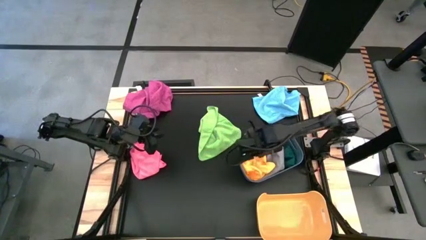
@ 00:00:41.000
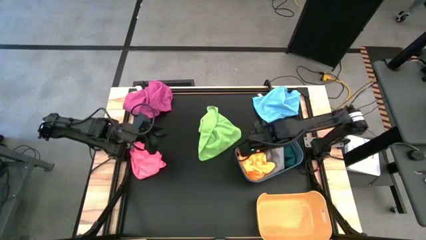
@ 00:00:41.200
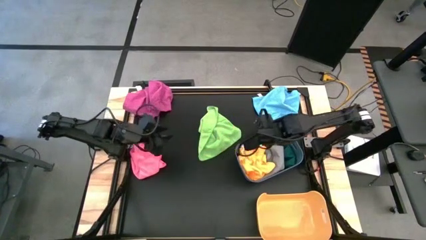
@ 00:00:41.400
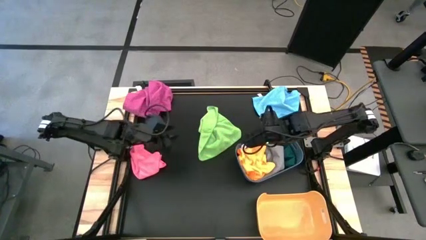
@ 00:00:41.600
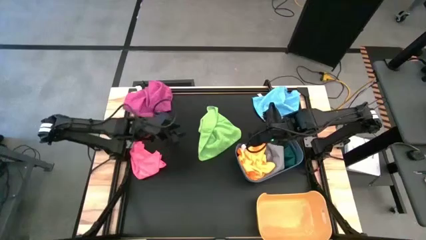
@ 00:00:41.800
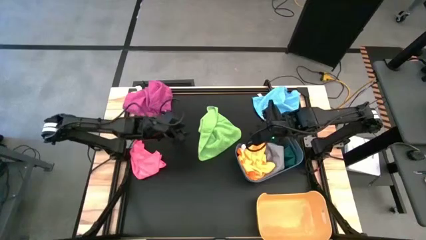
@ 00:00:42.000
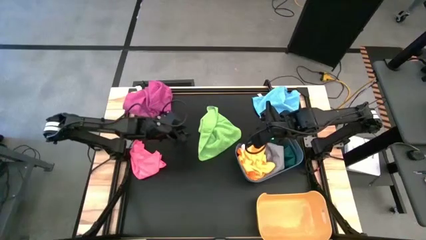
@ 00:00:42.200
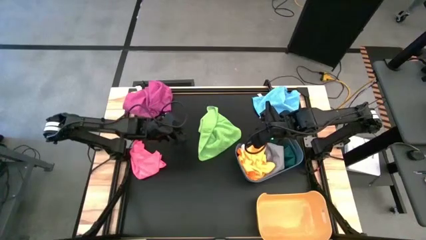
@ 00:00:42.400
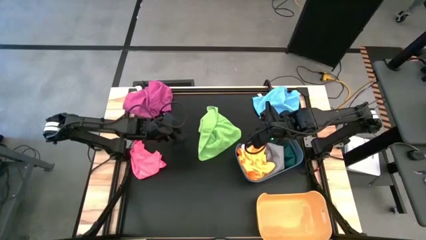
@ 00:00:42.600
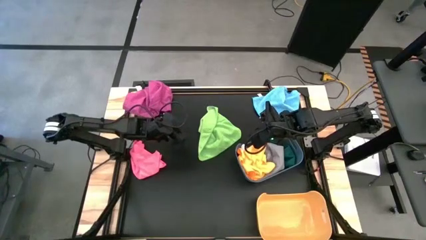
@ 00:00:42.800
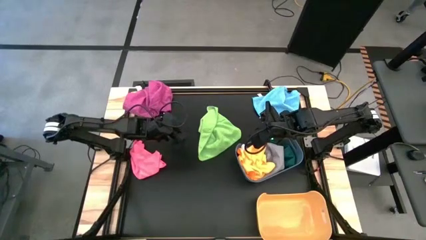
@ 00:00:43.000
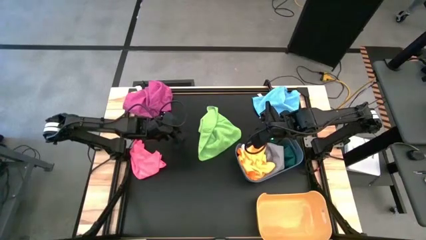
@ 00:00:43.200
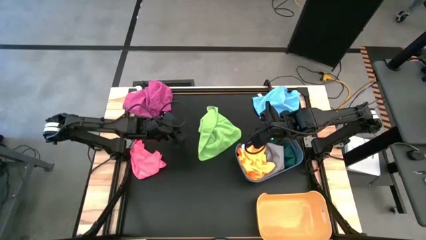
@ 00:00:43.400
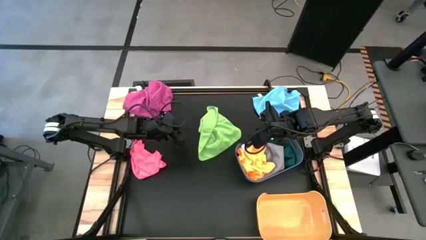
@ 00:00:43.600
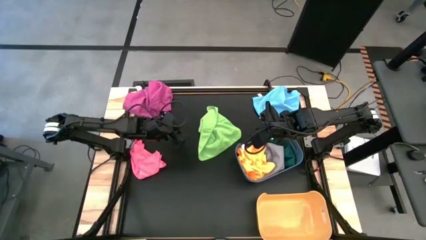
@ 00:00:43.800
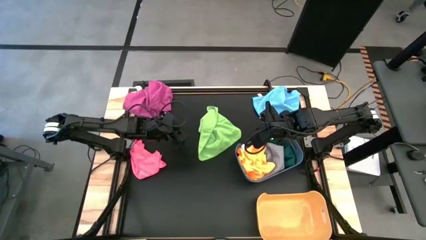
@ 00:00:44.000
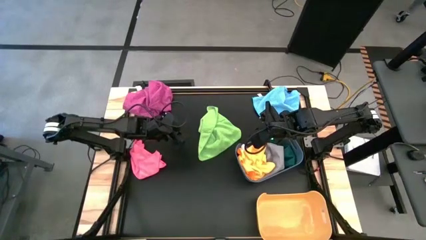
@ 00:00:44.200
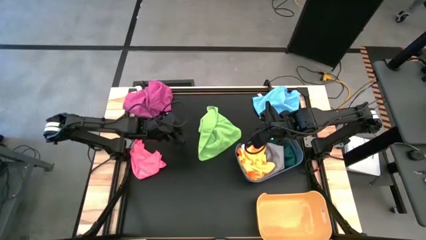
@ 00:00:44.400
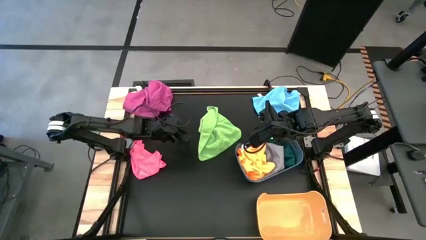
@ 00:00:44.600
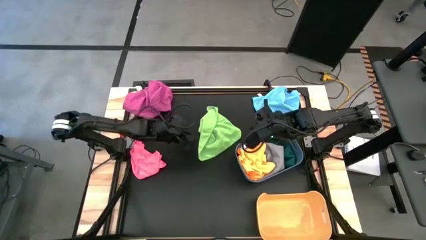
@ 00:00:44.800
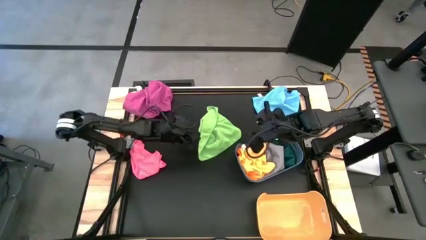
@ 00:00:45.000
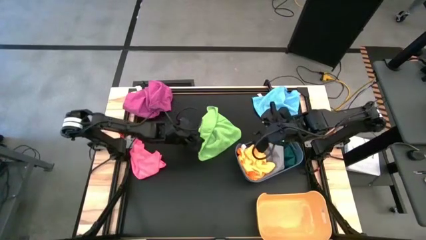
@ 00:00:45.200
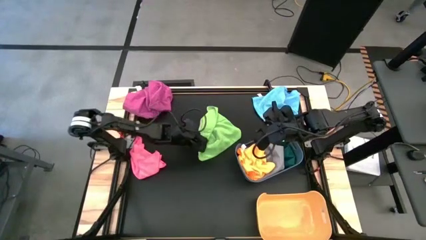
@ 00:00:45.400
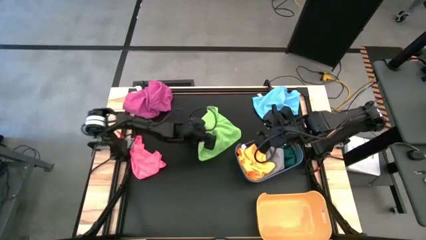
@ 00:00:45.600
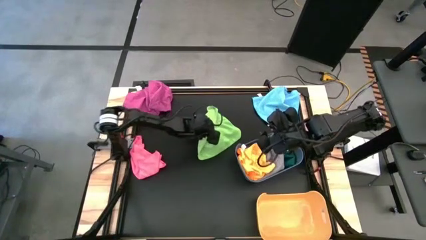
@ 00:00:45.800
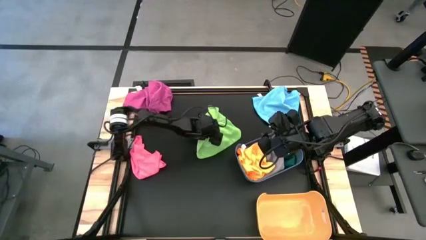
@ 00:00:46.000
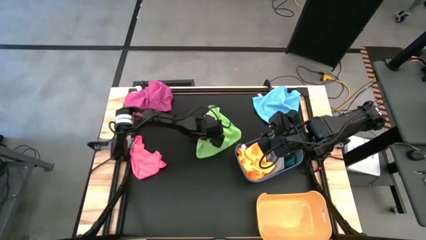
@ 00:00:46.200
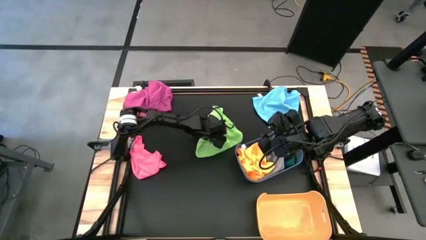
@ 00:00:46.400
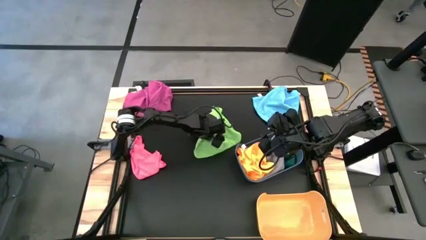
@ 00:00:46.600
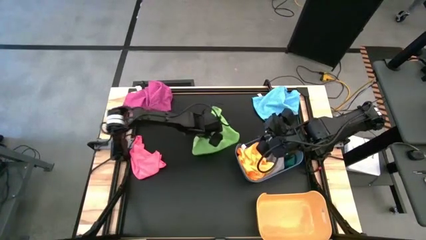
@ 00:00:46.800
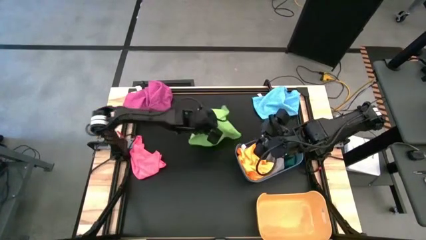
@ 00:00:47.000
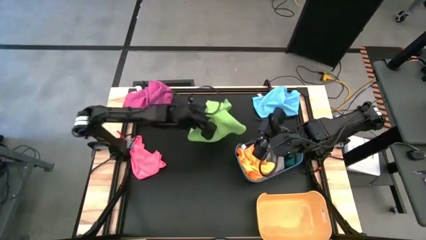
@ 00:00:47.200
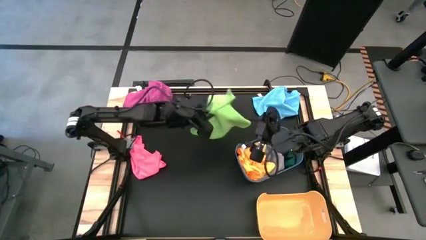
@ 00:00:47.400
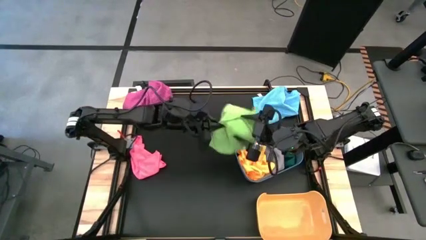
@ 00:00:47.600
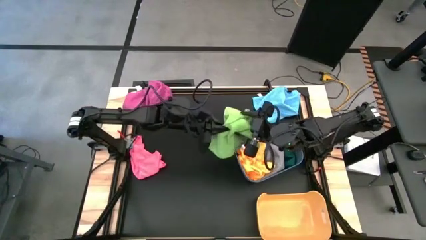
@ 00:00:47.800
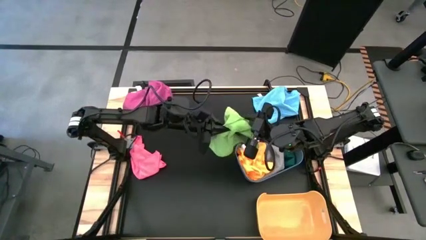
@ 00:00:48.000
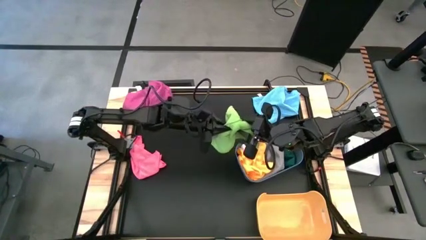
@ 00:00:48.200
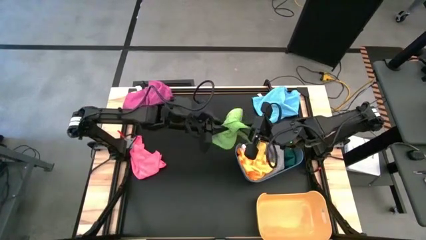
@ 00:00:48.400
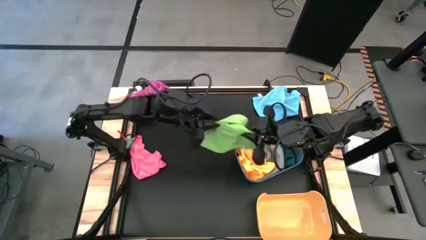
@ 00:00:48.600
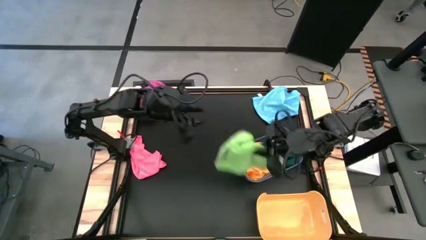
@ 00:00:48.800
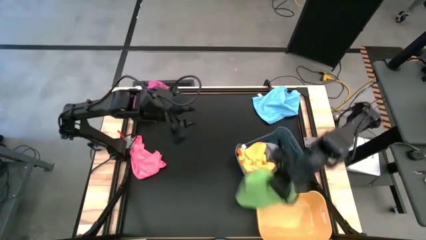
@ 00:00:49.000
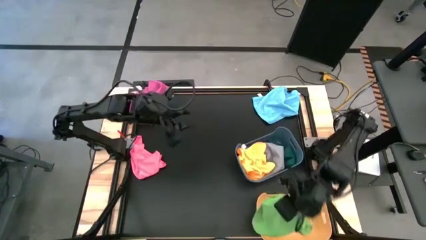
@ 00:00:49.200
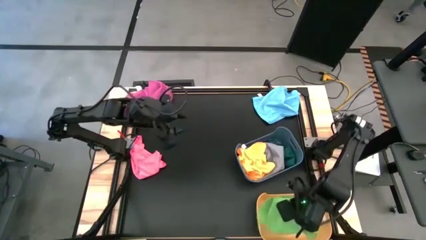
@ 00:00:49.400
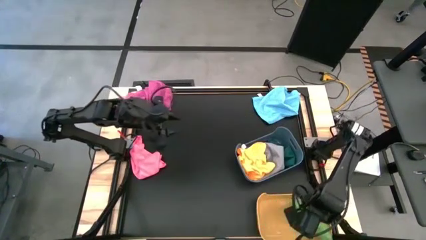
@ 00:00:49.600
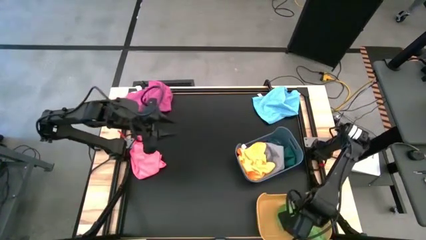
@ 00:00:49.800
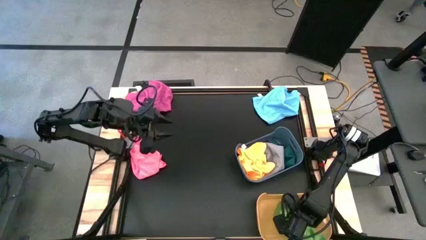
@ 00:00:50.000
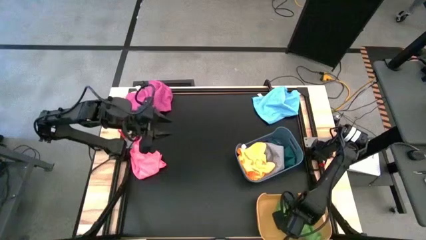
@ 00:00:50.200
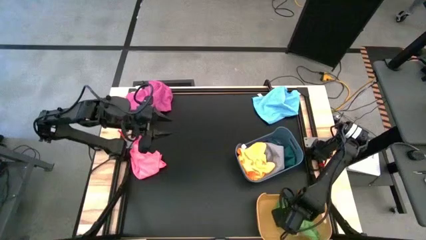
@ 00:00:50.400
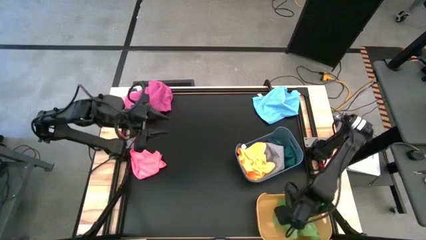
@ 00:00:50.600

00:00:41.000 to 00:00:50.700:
Task: Sort towels by color in basket
Put the light green towel into the yellow bin

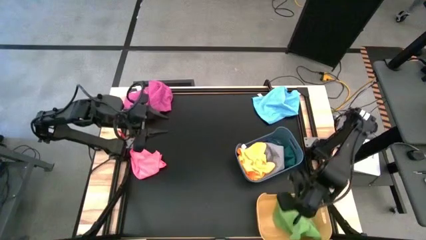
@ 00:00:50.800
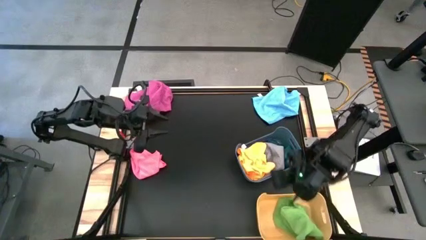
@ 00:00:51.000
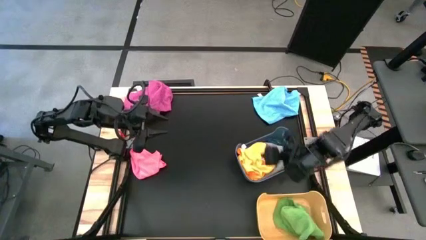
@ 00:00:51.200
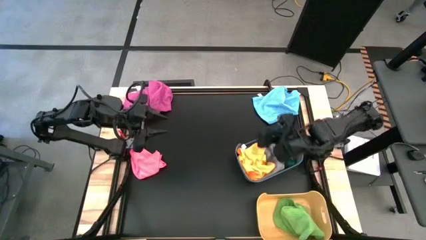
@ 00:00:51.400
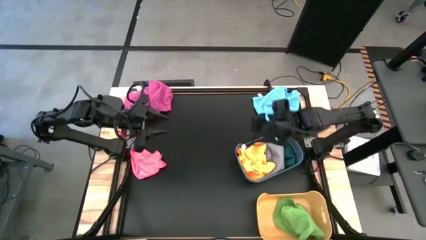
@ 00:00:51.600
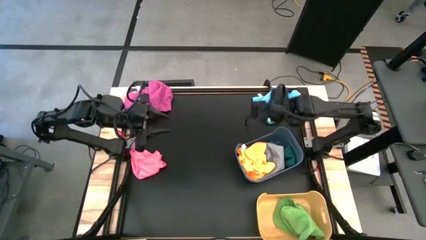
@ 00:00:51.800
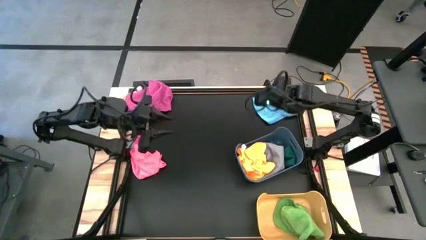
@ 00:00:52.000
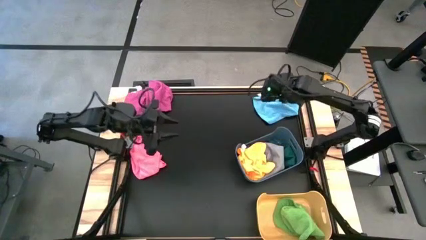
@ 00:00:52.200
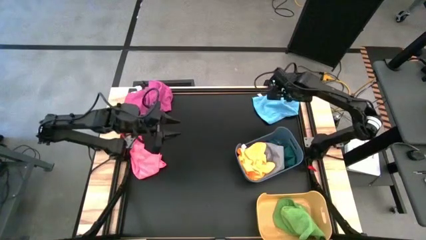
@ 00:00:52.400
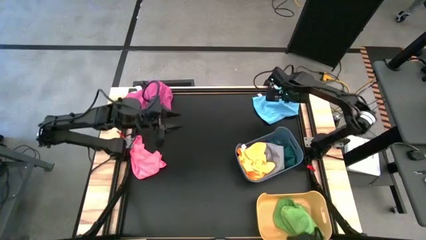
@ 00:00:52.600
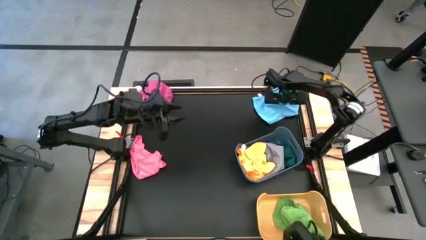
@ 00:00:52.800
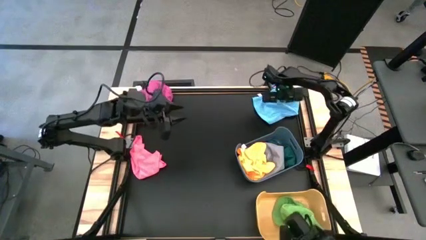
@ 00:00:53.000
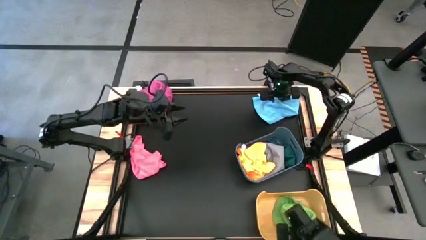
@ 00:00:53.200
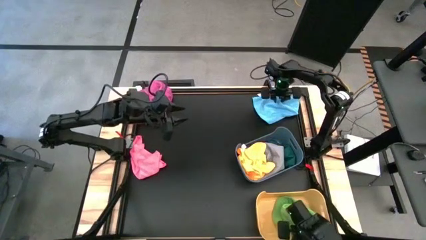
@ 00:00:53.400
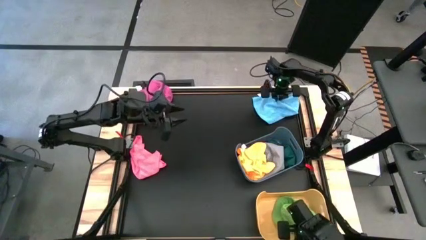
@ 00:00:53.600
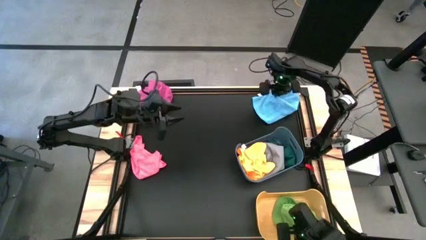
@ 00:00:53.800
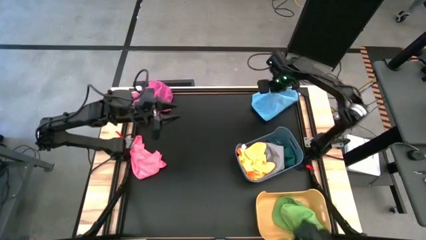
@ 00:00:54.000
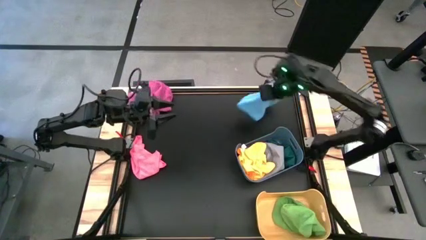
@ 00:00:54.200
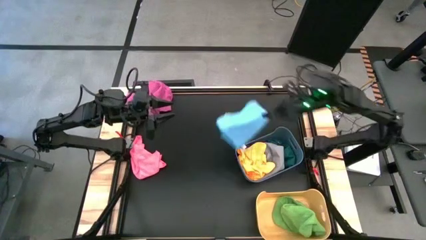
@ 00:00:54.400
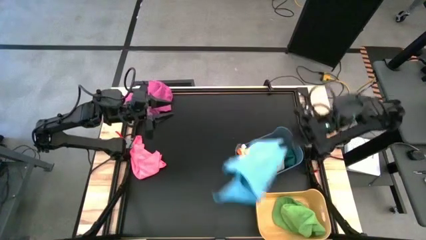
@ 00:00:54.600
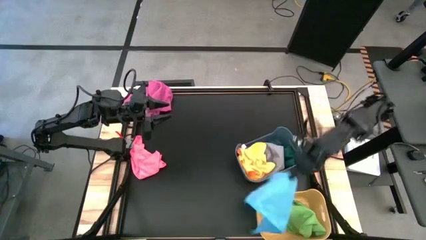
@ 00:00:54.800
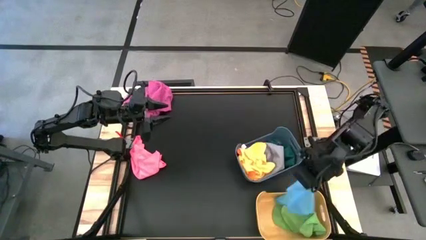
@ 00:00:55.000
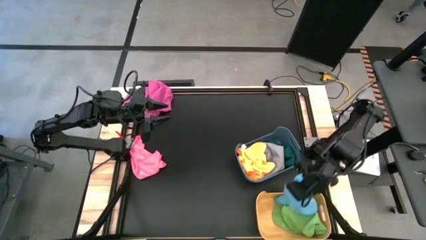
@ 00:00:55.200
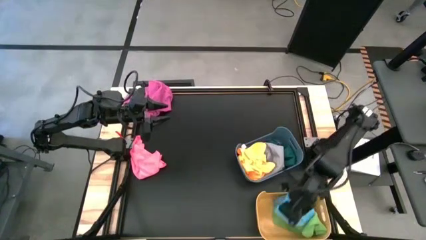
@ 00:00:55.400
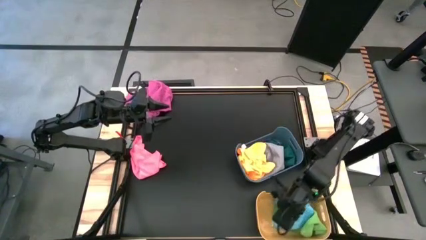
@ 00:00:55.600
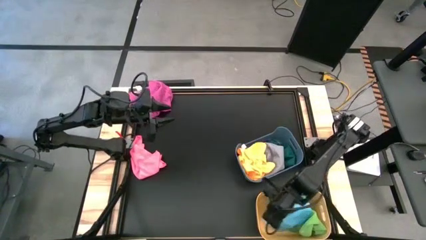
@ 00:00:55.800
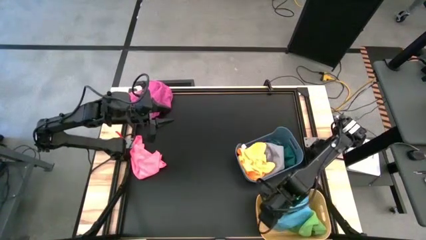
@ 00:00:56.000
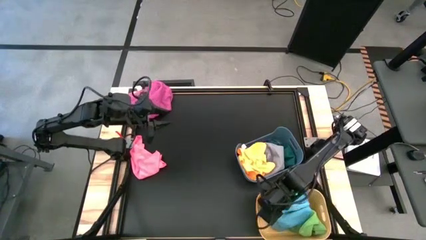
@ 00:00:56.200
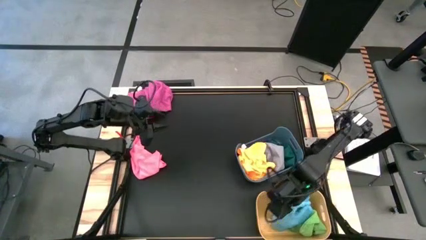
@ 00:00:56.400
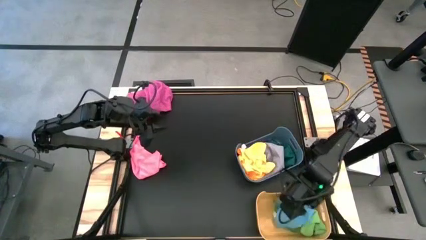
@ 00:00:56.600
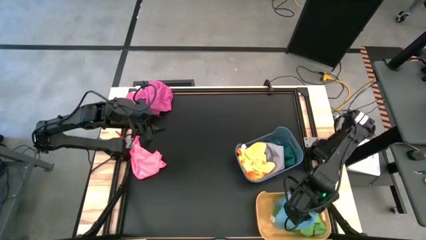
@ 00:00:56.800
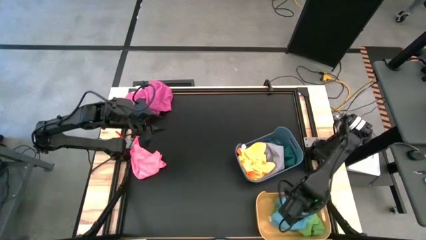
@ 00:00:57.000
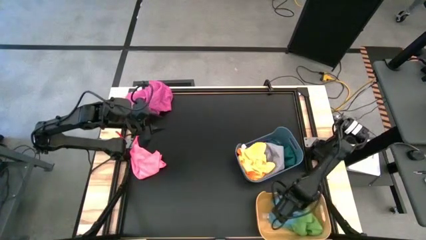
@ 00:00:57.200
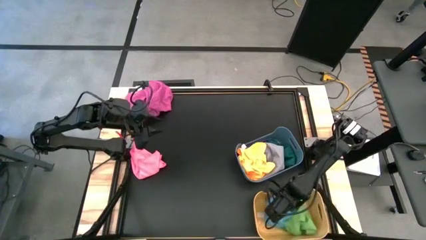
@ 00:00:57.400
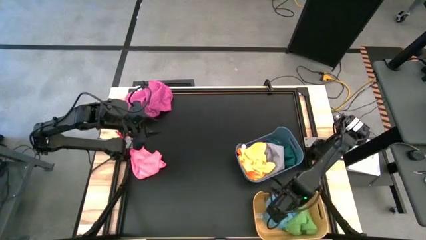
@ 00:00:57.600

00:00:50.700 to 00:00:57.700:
Put the blue towel into the yellow bin
